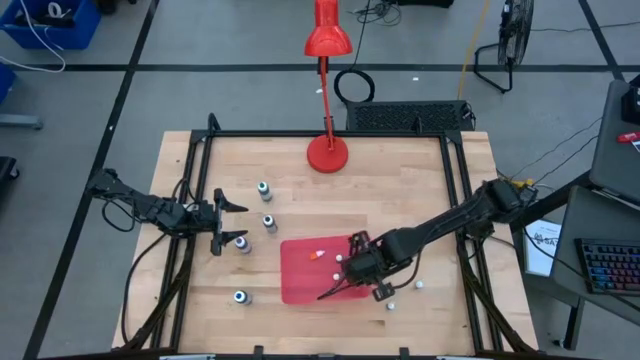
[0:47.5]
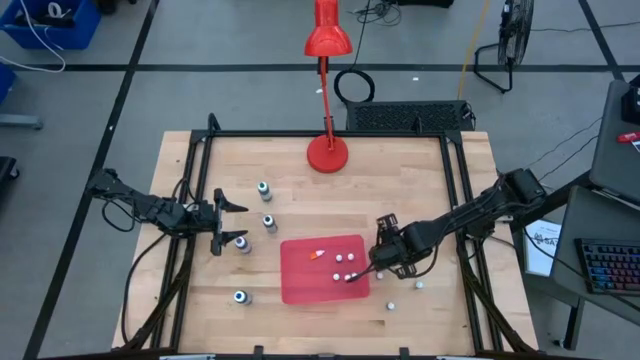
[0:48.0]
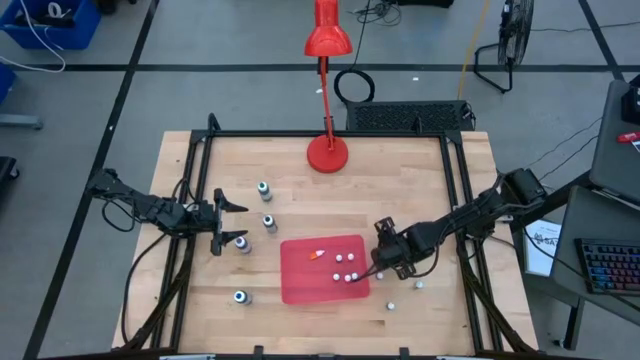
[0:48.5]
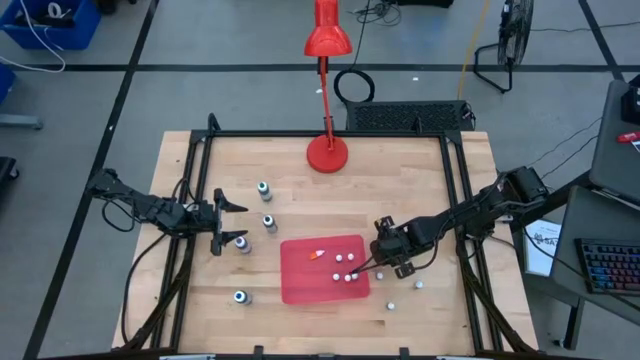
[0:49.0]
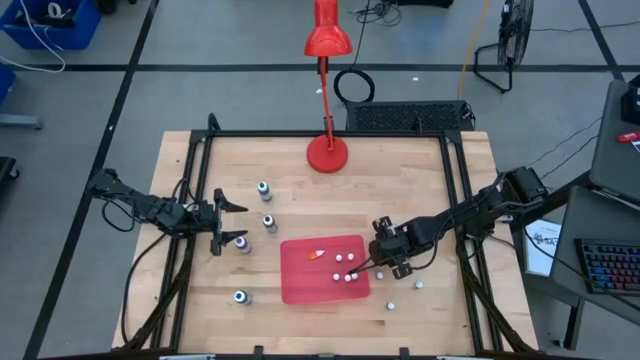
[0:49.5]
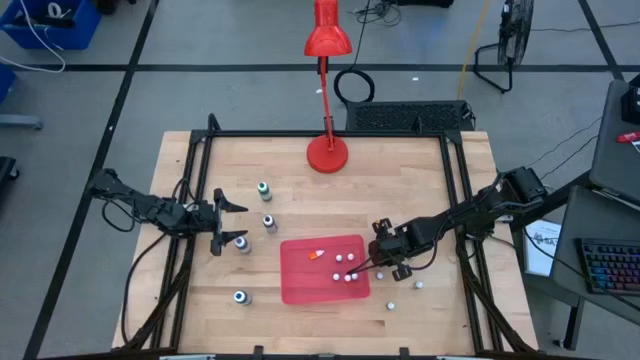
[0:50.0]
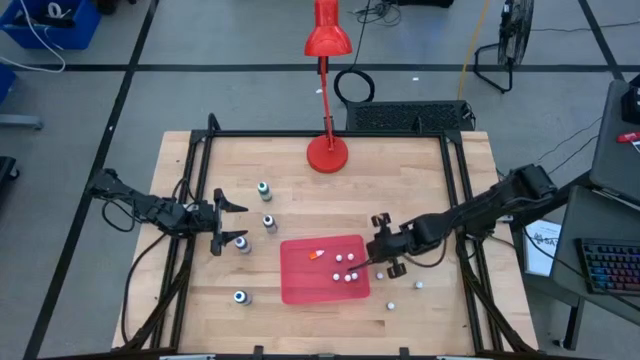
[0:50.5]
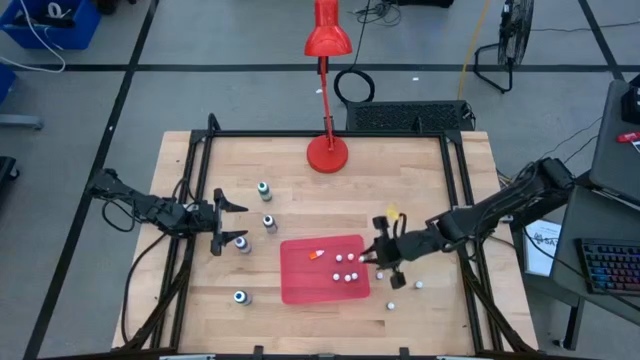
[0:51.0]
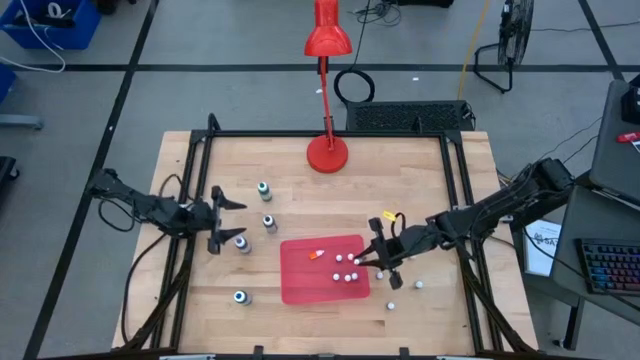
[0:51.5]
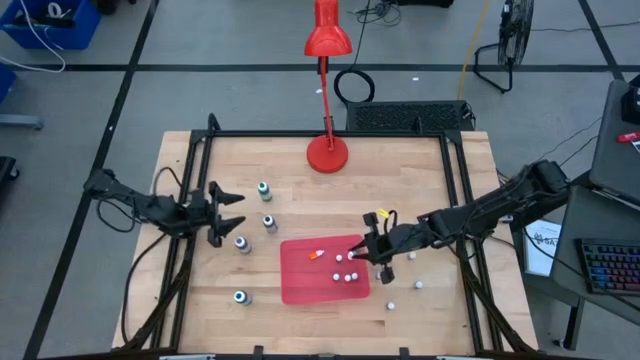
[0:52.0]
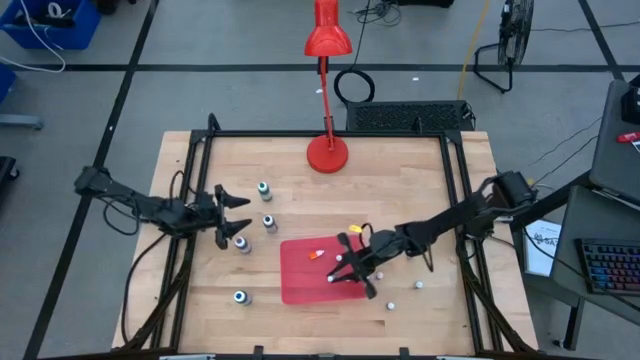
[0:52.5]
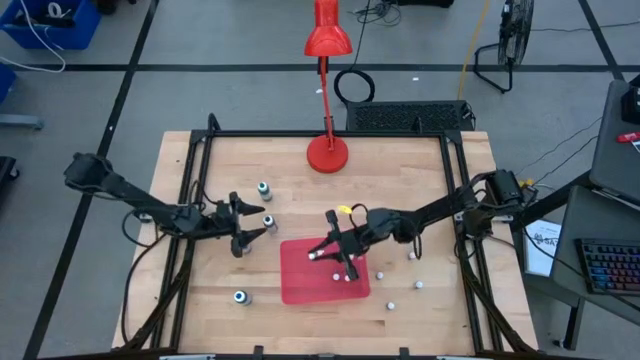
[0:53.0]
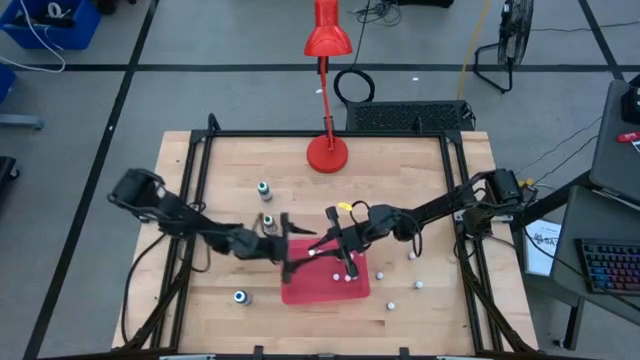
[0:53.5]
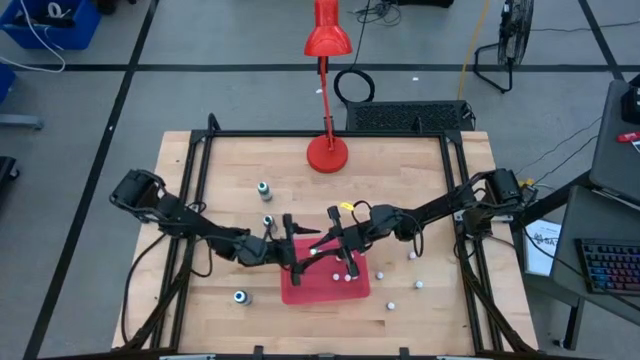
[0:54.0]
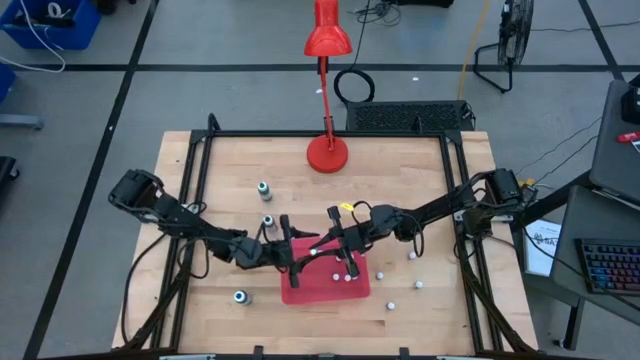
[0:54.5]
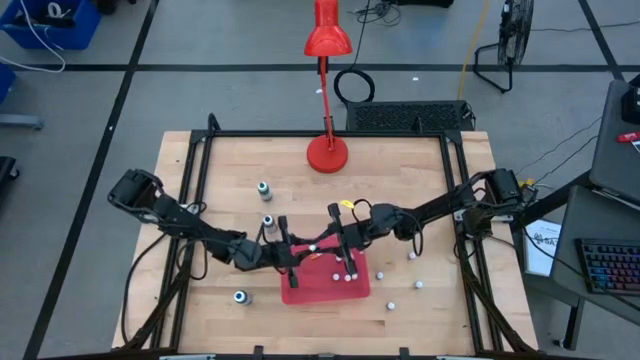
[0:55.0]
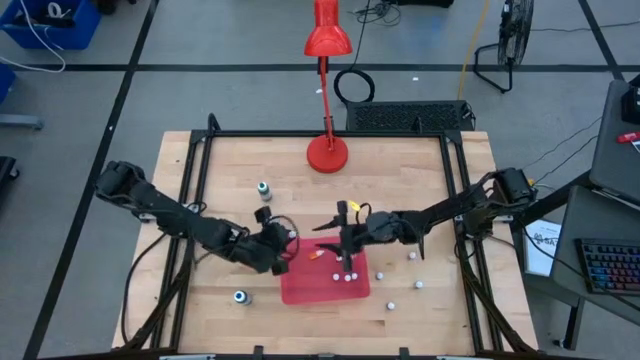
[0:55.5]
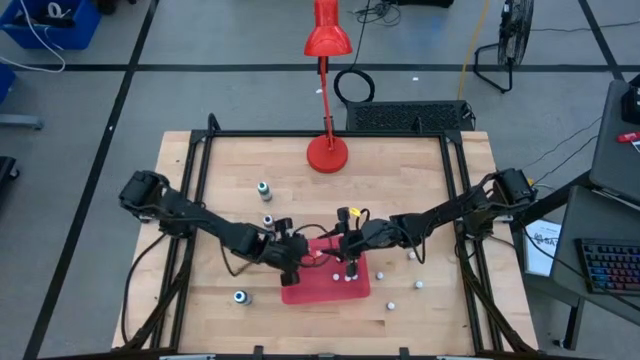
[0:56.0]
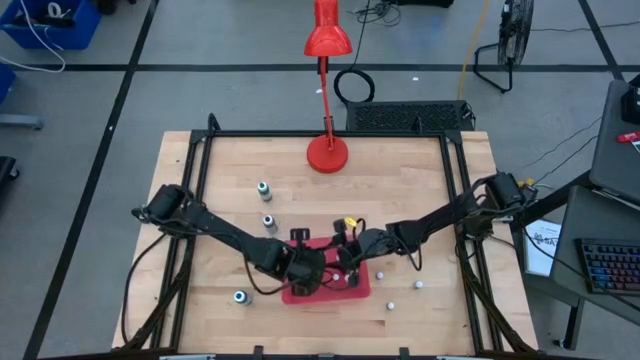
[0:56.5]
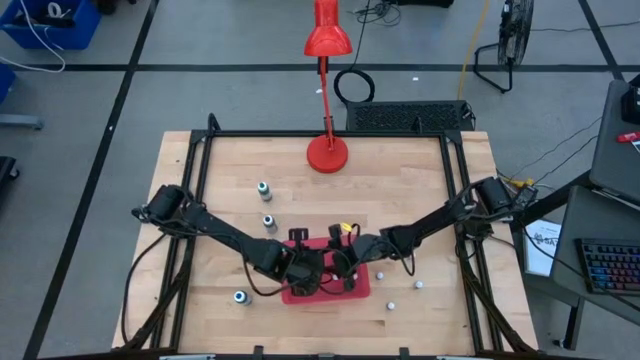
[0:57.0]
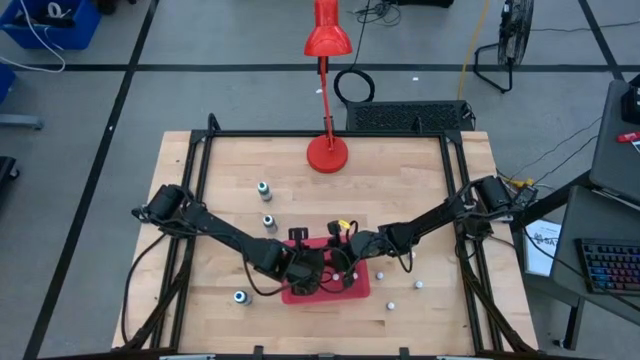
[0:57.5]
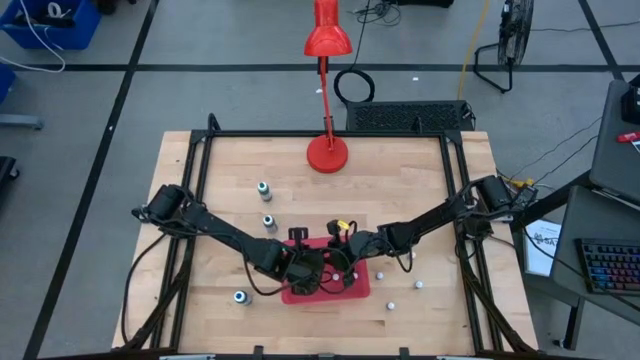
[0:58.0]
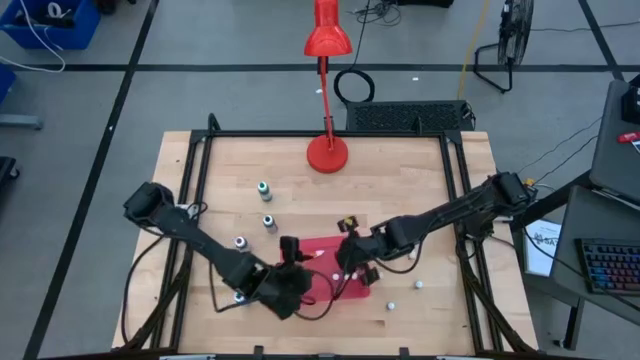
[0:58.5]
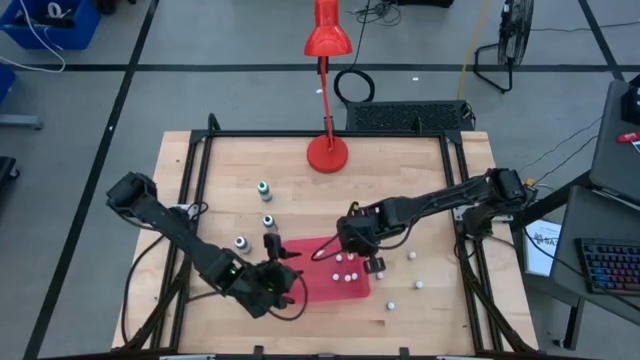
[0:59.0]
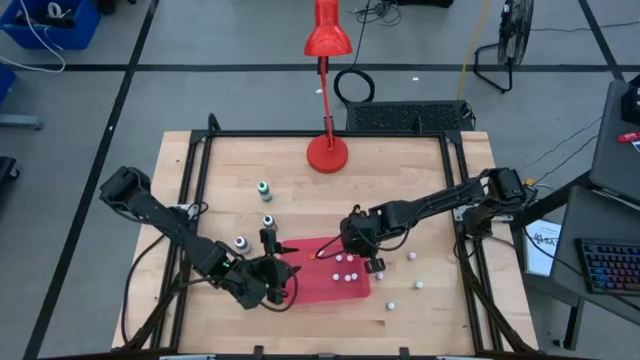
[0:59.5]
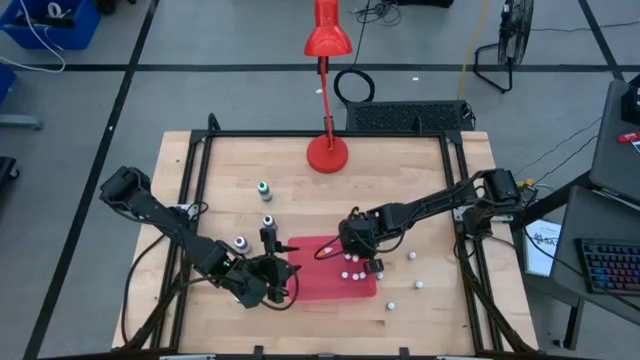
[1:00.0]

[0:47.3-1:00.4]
Task: Pick & Place food coloring
Put the small yellow food coloring bottle into the pink container

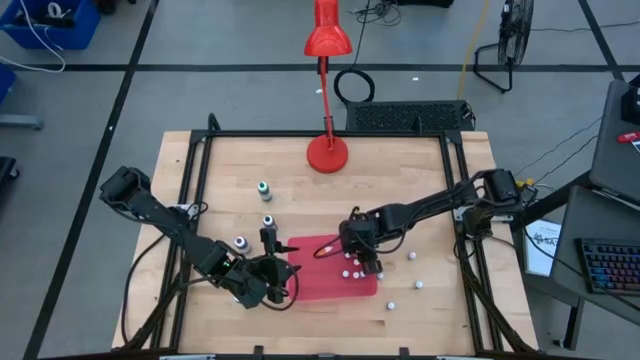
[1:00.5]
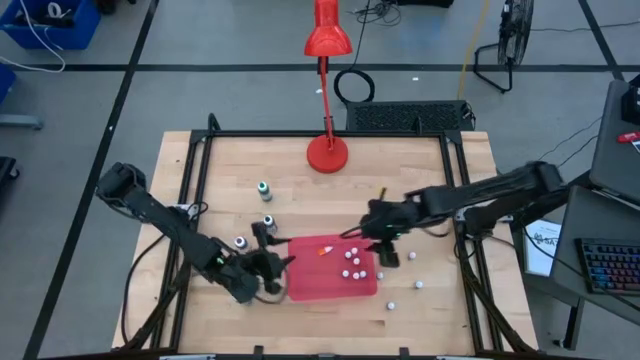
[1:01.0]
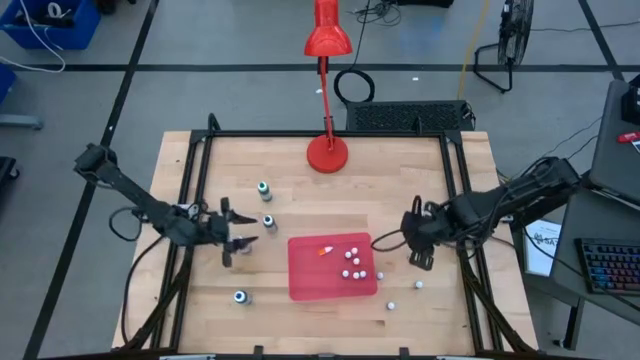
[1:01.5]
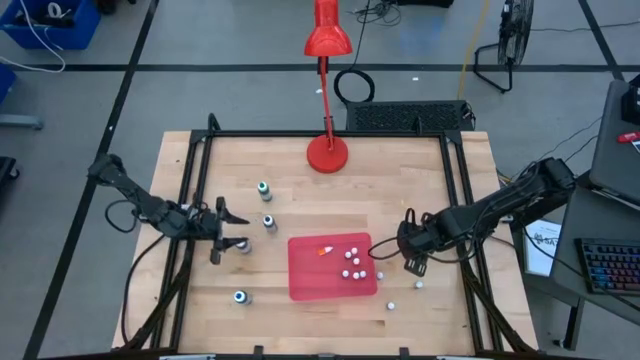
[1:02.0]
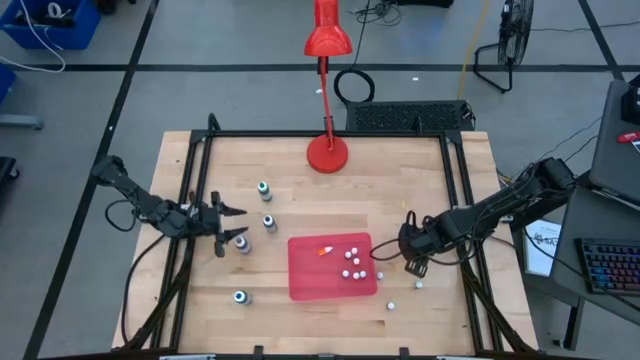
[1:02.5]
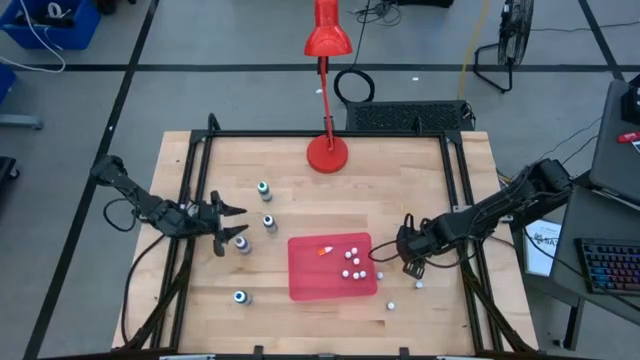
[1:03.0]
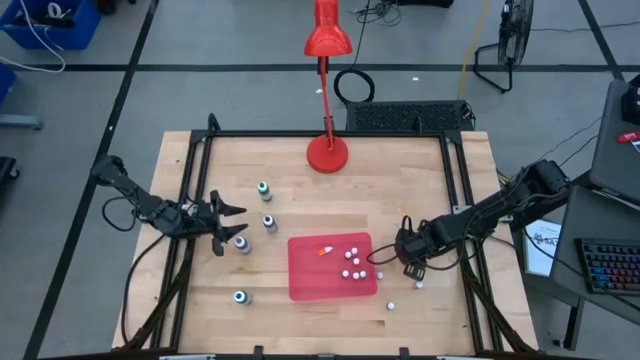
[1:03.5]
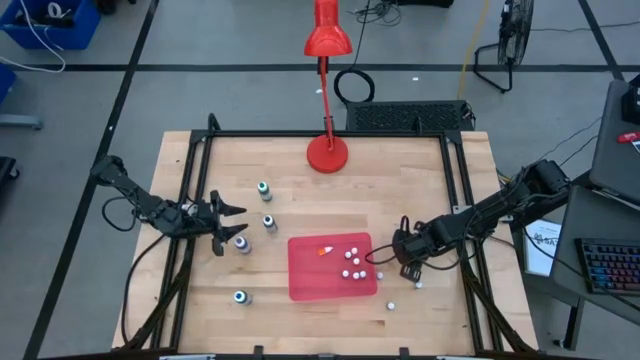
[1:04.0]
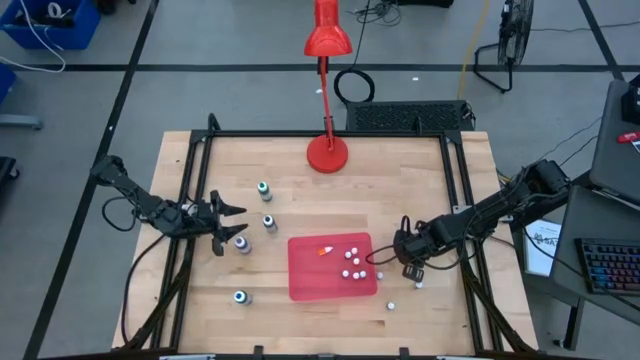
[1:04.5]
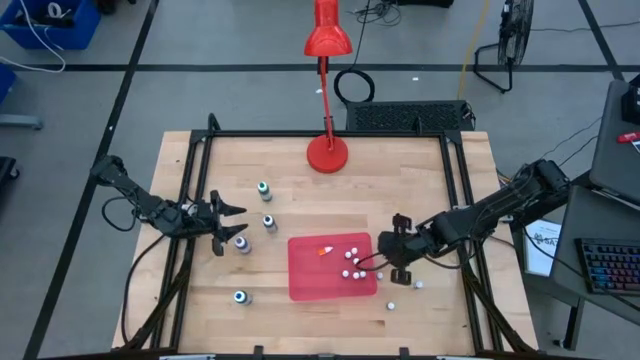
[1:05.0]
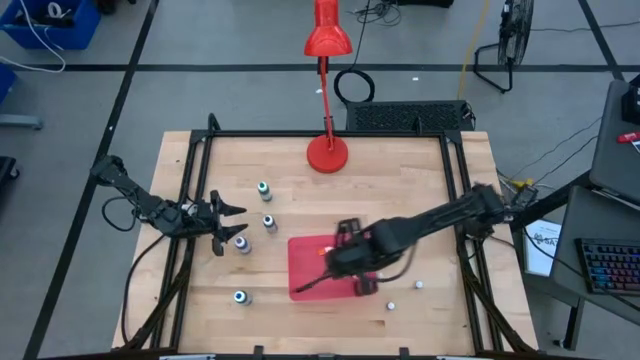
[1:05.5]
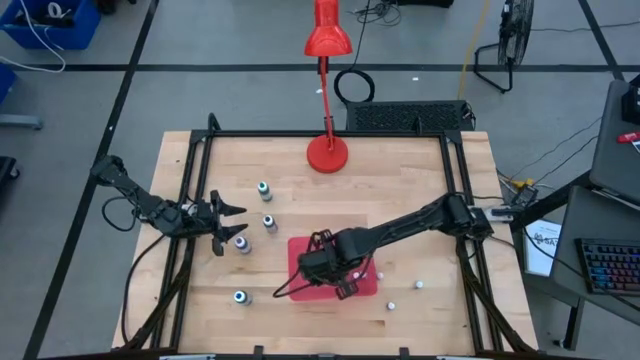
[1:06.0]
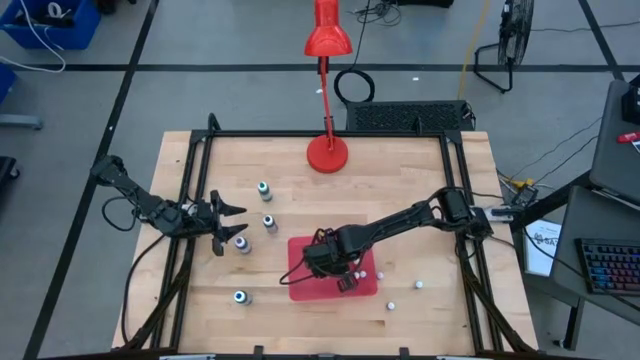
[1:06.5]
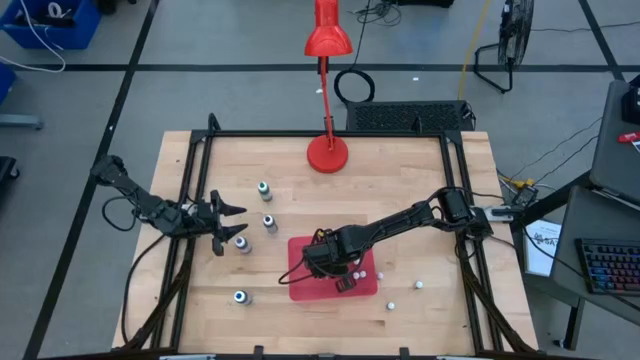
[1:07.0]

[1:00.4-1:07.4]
Put the small red food coloring bottle into the pink container
